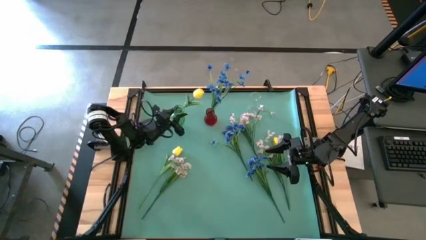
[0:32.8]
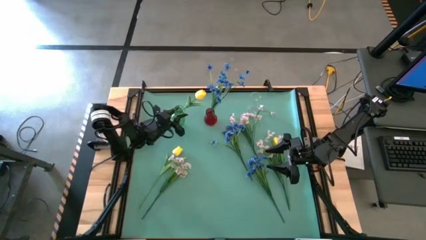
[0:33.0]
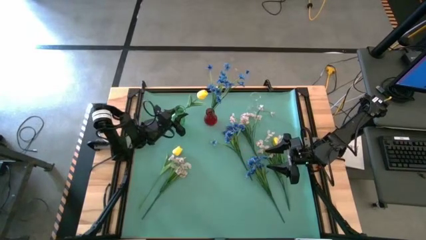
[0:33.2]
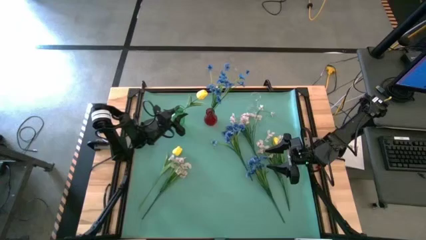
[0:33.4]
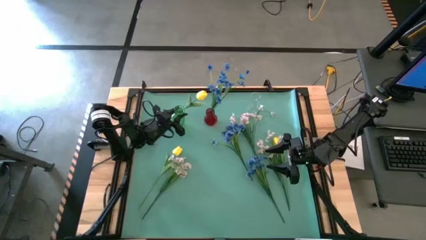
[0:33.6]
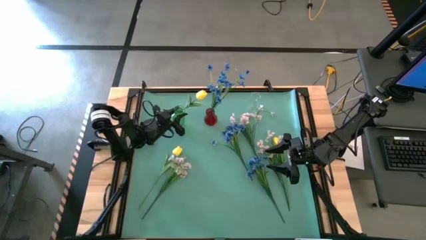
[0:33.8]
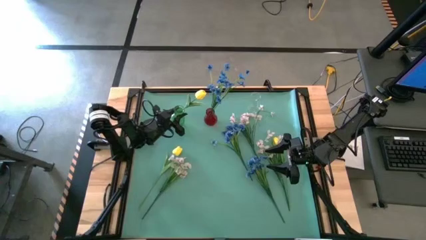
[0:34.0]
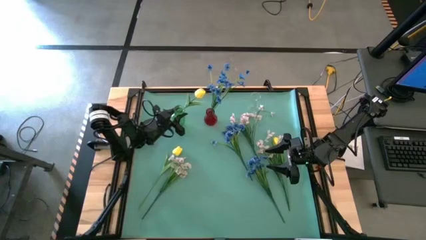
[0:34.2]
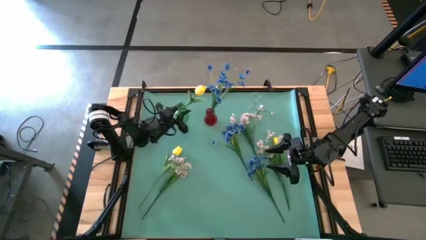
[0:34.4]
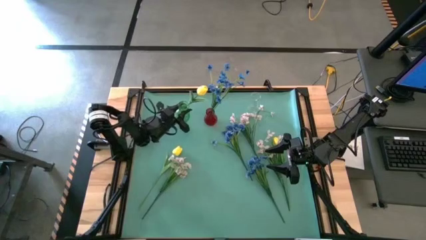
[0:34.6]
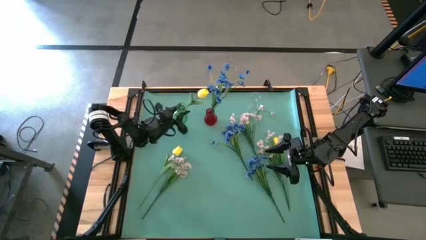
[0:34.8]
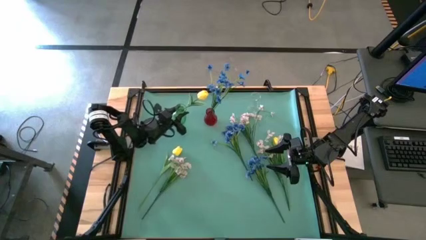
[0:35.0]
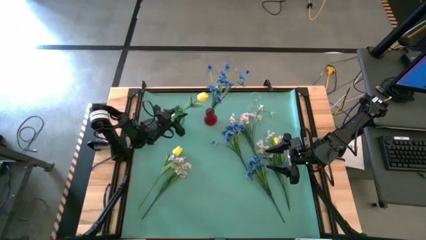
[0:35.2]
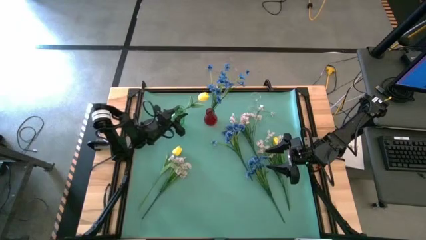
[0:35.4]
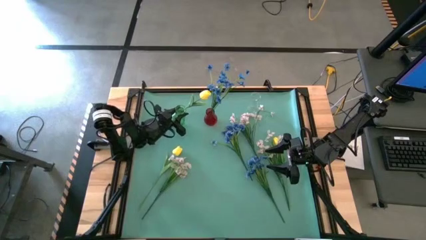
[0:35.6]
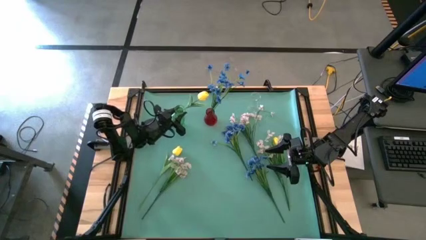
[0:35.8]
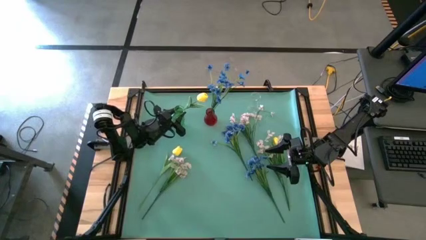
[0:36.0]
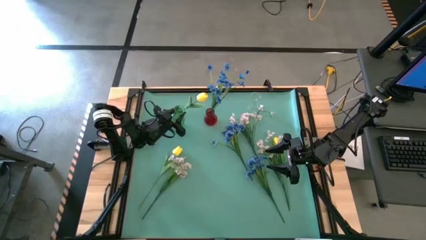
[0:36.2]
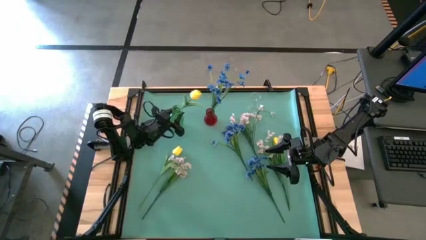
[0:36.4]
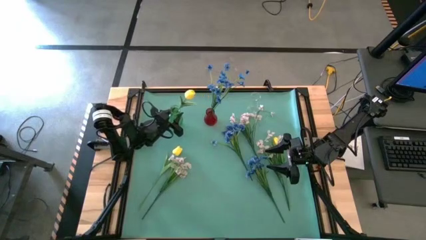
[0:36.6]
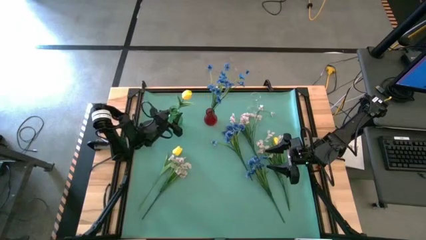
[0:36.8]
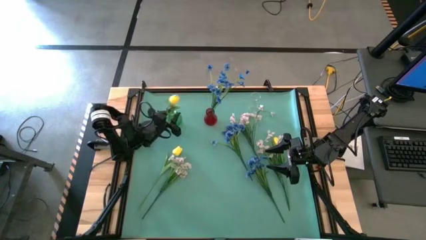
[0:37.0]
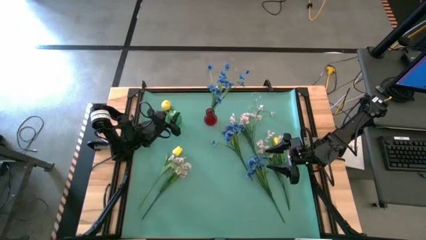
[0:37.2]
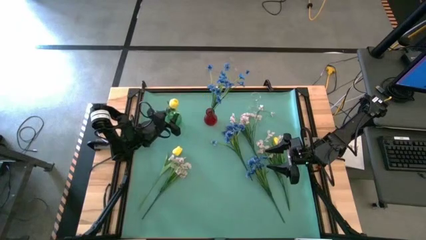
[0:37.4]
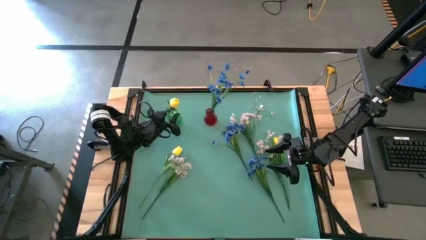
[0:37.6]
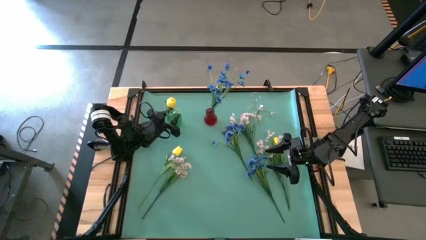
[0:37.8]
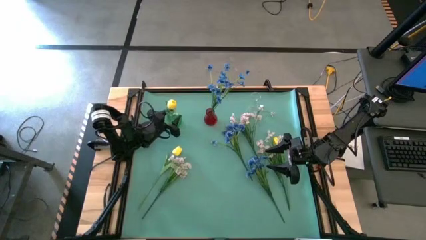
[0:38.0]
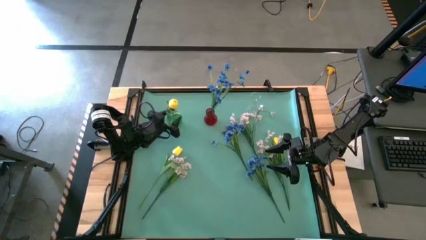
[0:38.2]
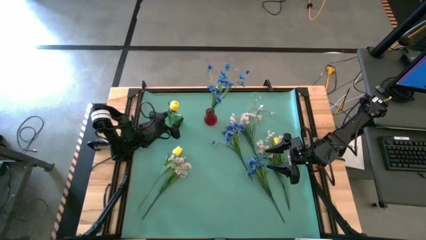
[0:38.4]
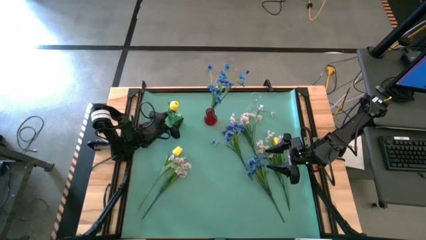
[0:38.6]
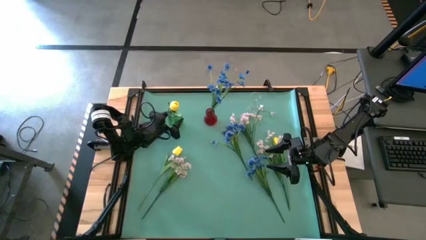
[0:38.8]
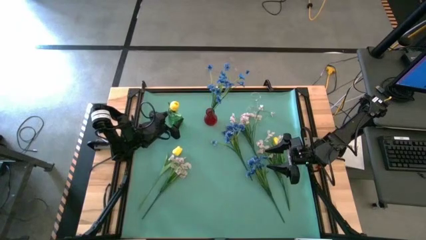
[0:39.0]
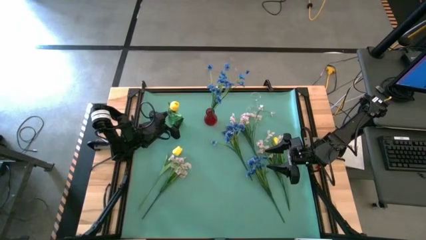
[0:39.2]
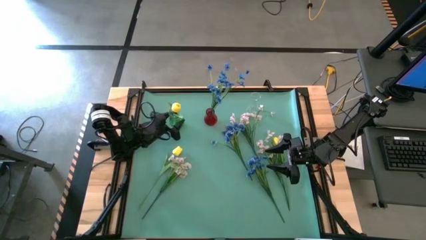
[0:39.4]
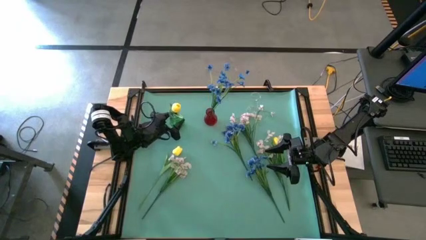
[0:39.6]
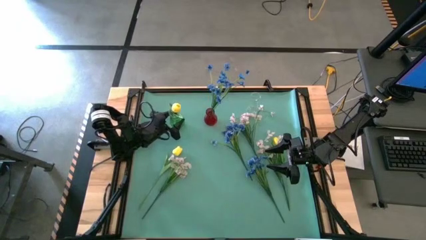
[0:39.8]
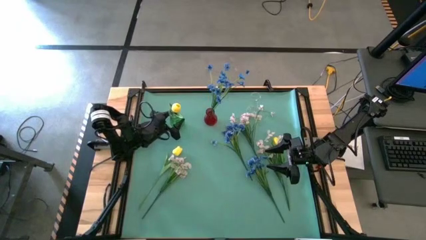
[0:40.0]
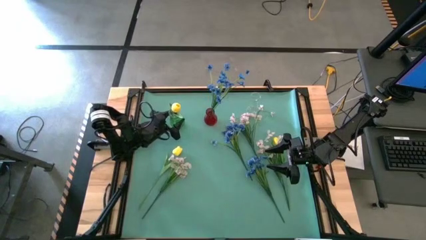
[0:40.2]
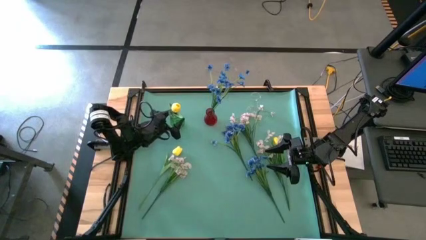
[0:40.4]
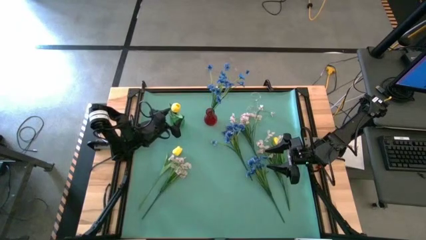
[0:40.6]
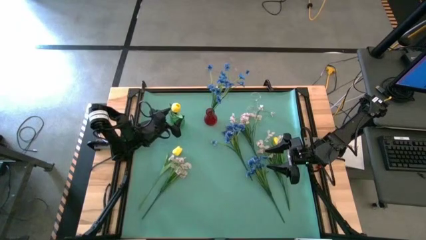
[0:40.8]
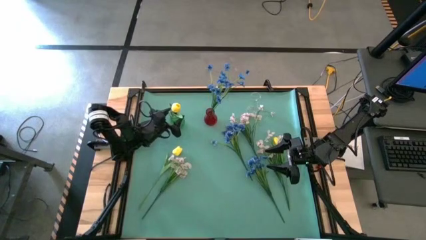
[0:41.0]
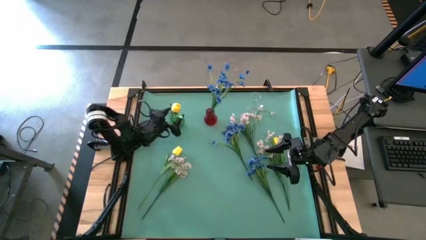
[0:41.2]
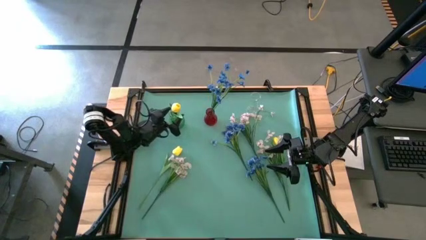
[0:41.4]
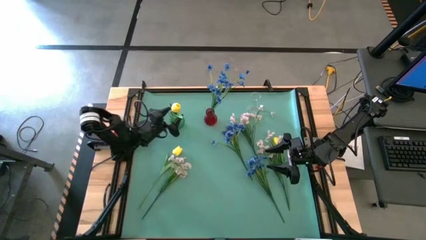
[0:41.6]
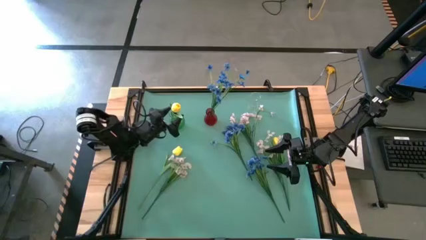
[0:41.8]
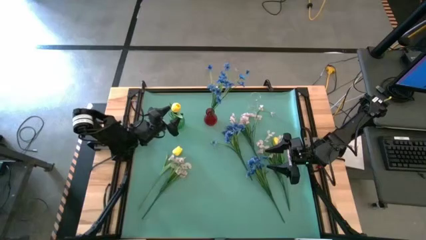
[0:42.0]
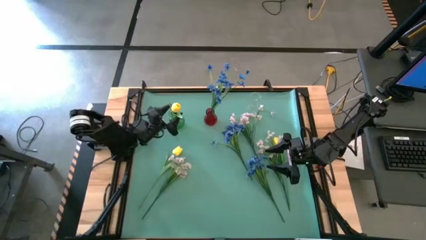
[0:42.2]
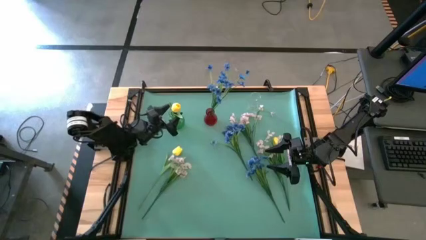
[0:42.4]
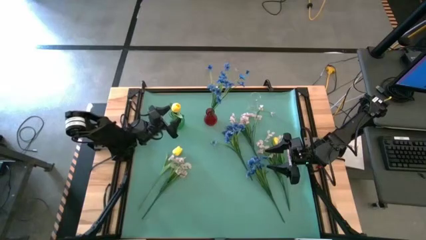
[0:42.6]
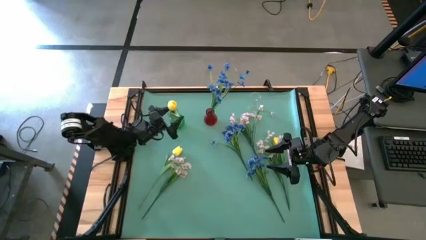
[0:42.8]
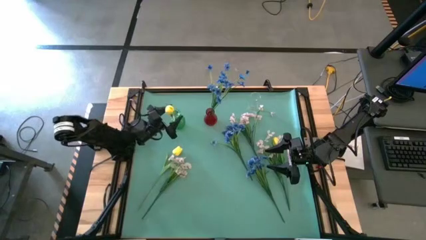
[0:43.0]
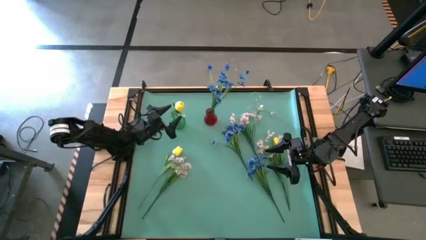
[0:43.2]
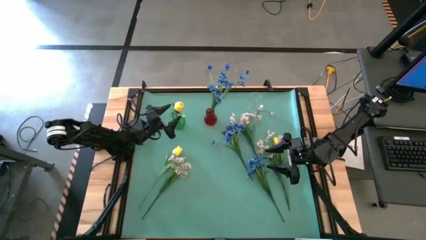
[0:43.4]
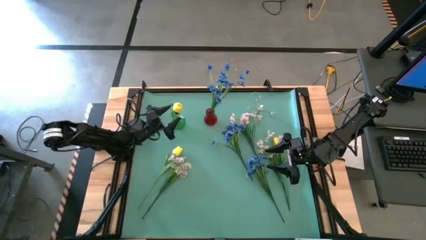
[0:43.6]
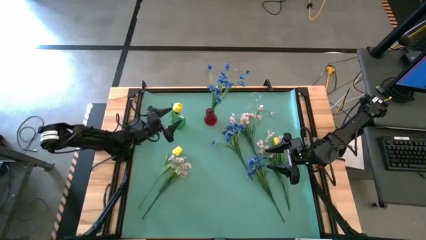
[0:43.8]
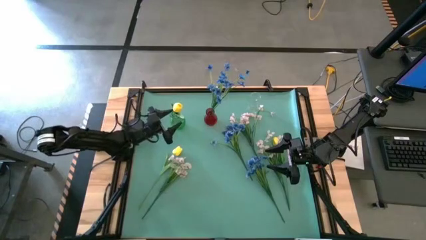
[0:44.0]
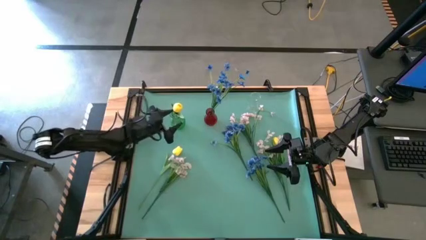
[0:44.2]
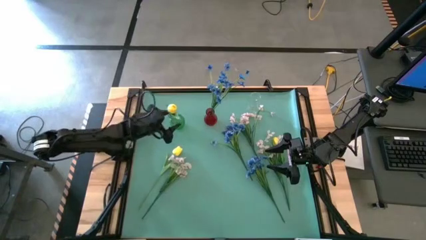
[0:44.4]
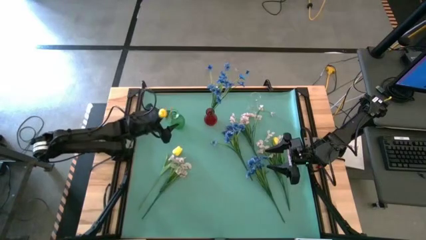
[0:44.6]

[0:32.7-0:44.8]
Task: Sort flowers into vase by color
Put the middle yellow flower into the green vase

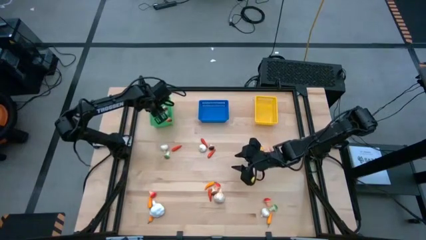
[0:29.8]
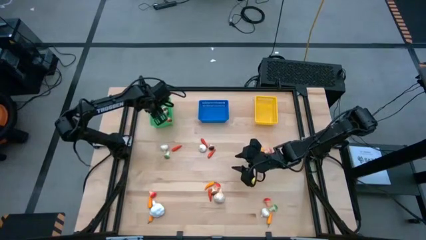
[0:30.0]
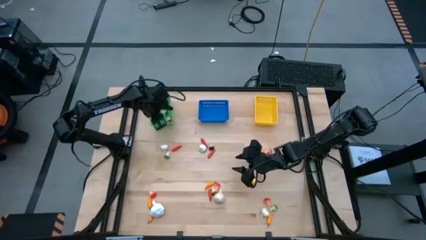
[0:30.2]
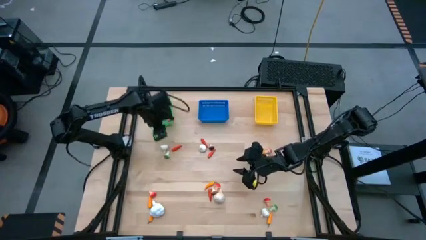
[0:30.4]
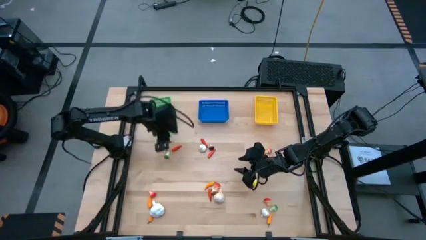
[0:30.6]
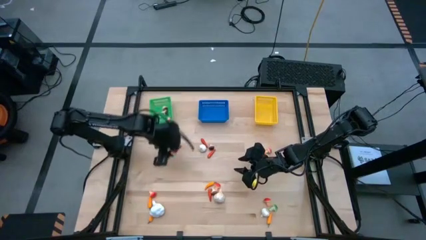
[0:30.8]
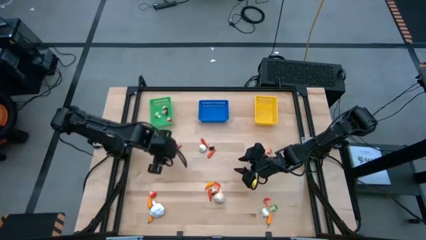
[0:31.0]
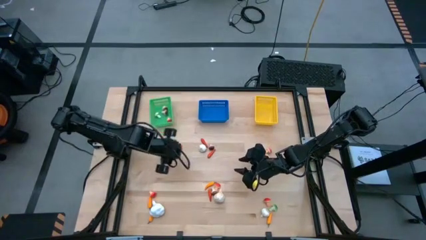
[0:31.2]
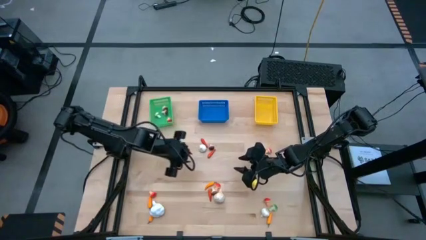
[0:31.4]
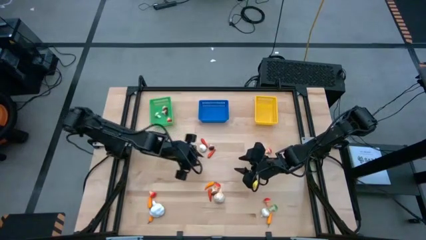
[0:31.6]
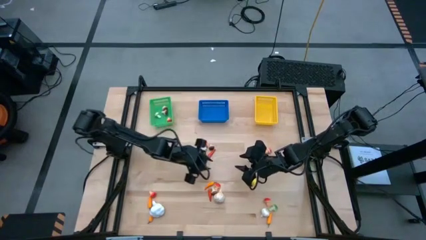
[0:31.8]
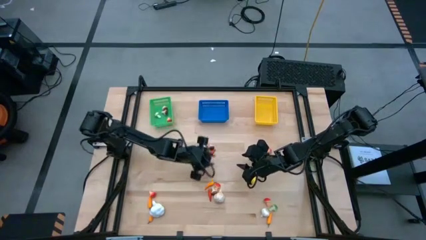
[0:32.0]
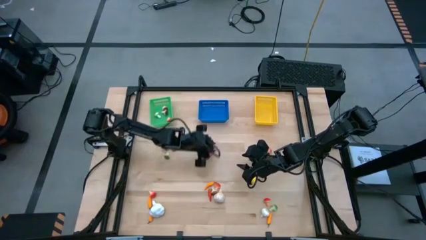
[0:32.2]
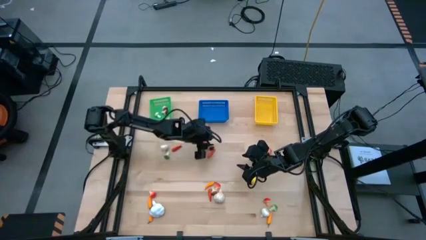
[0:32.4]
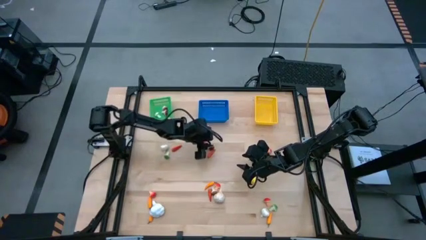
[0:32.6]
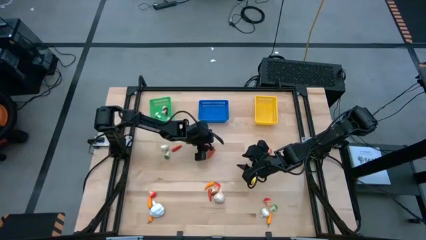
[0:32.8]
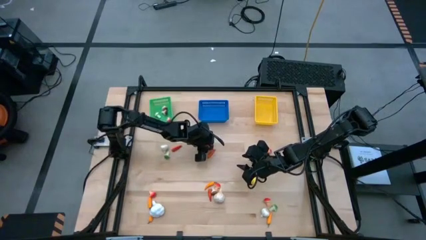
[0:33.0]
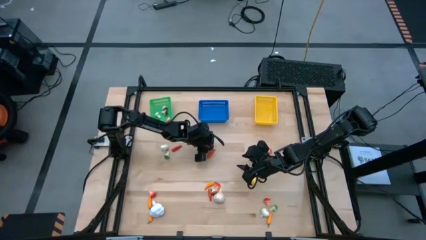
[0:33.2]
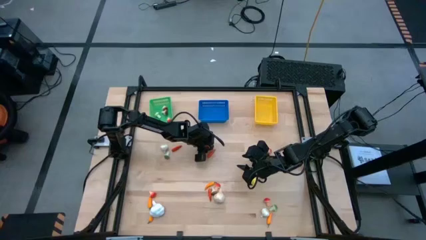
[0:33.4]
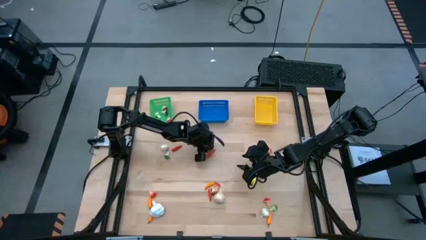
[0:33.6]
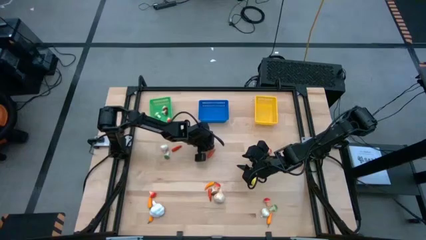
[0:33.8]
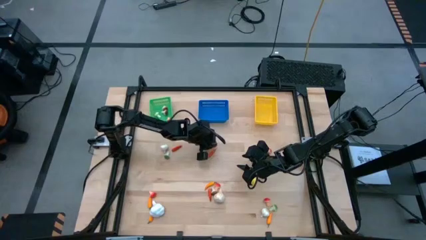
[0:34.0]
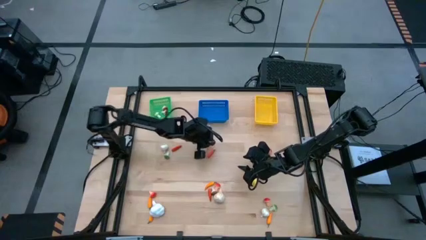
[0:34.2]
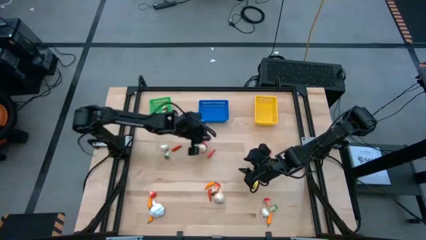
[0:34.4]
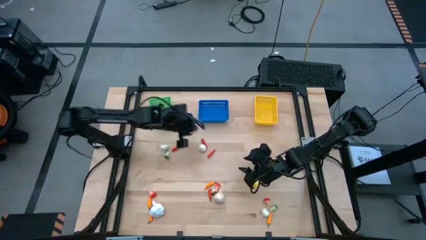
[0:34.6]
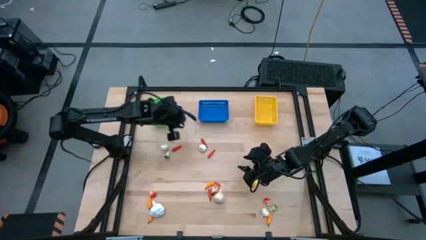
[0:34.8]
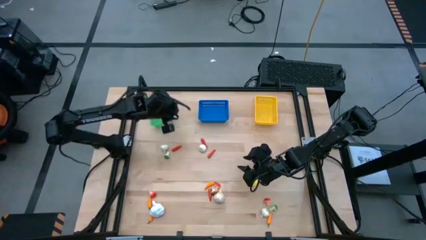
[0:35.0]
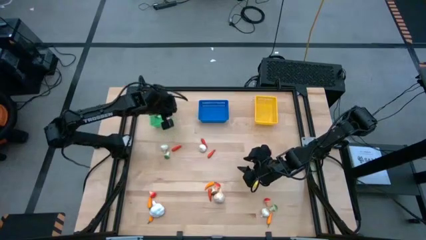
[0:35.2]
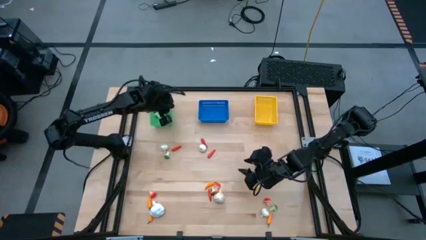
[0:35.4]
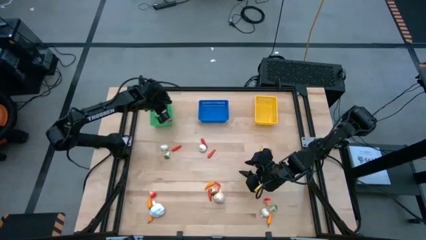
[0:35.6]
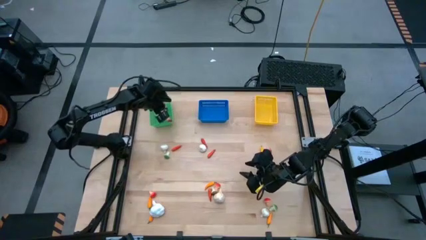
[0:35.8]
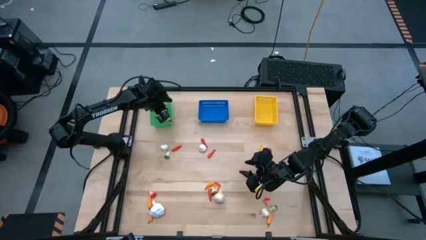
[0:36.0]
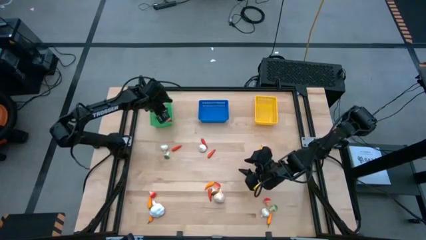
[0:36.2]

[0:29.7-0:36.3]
Task: Sort produce into baskets
Put the brown mushroom into the green bin
